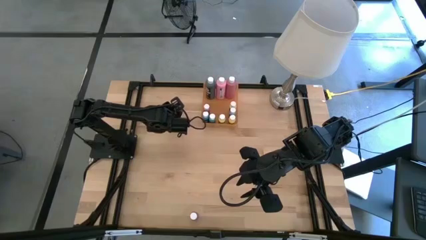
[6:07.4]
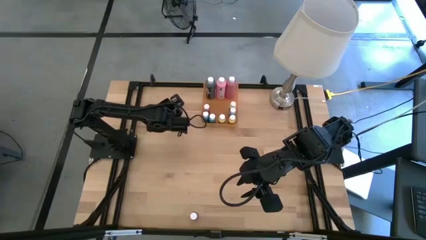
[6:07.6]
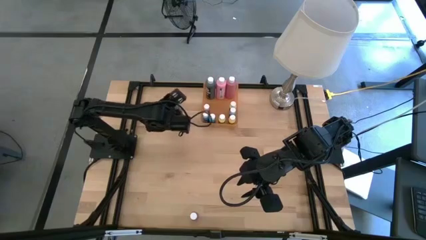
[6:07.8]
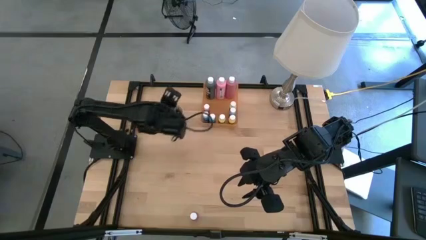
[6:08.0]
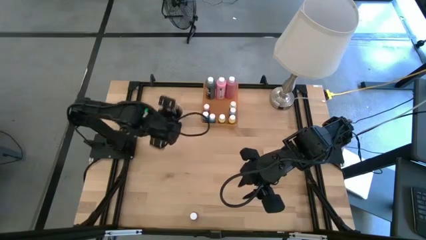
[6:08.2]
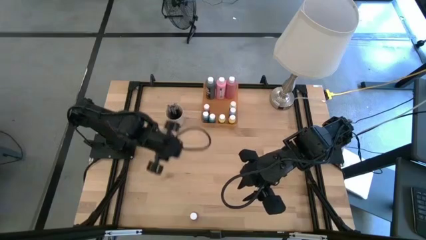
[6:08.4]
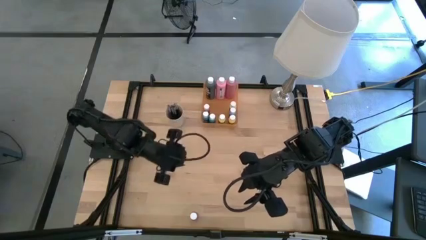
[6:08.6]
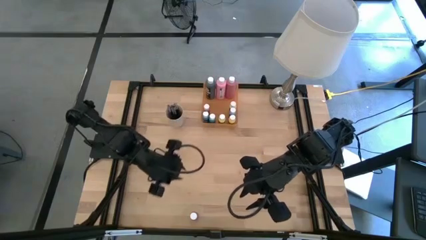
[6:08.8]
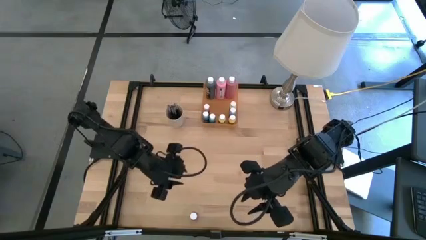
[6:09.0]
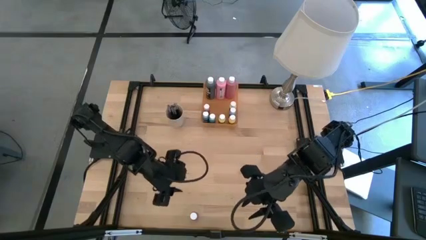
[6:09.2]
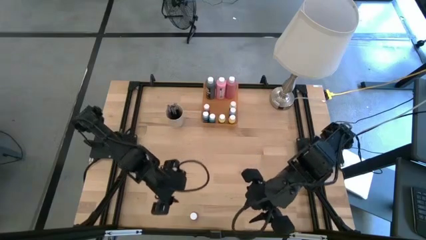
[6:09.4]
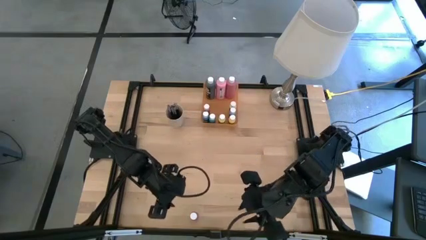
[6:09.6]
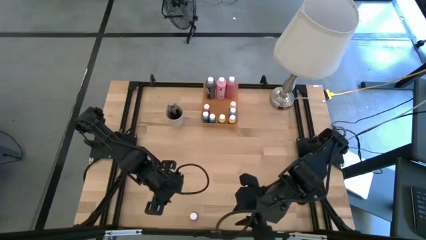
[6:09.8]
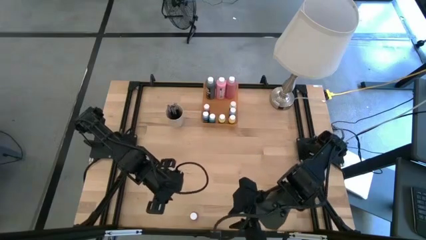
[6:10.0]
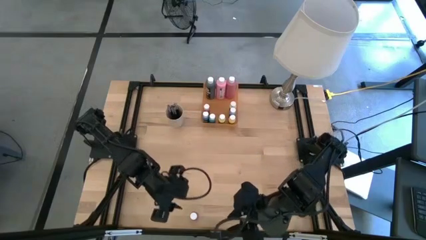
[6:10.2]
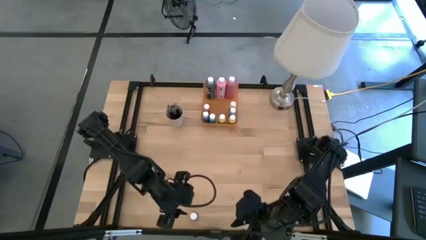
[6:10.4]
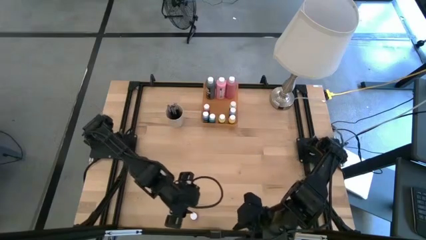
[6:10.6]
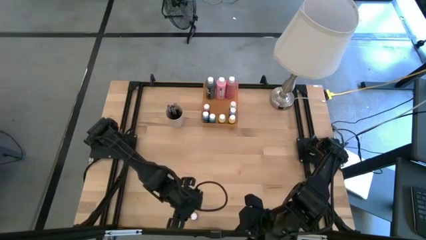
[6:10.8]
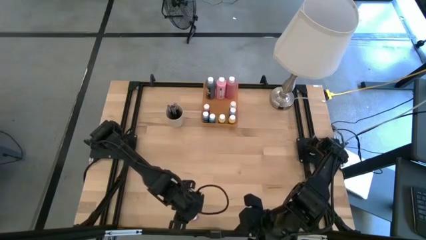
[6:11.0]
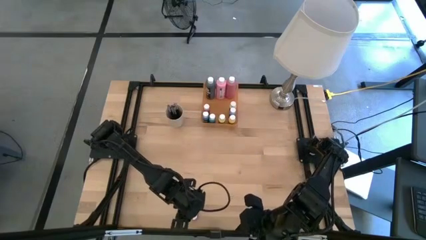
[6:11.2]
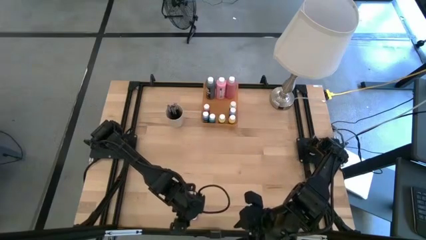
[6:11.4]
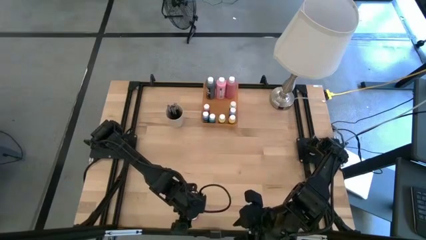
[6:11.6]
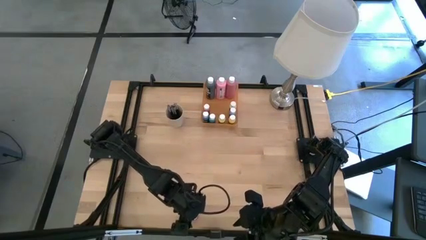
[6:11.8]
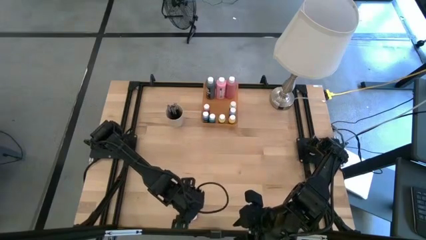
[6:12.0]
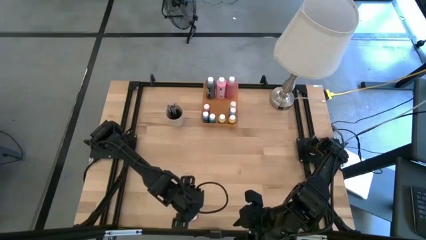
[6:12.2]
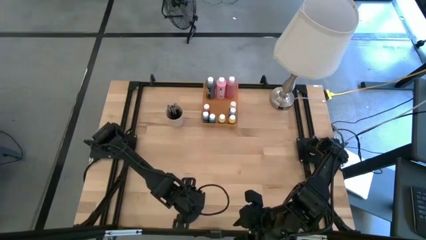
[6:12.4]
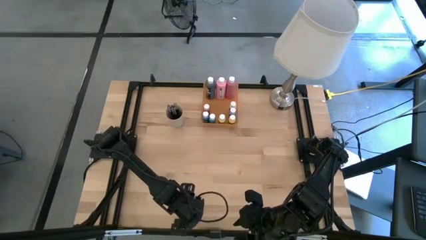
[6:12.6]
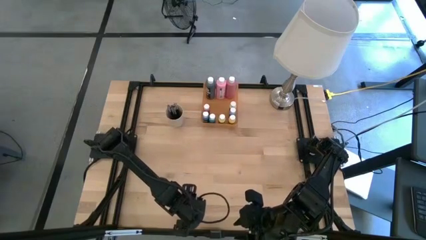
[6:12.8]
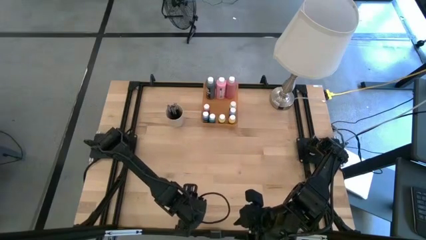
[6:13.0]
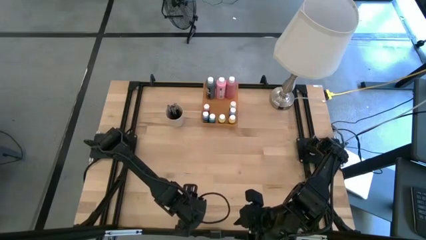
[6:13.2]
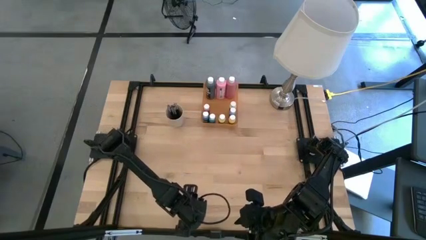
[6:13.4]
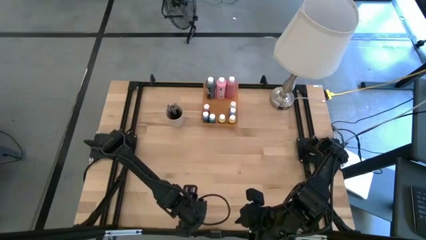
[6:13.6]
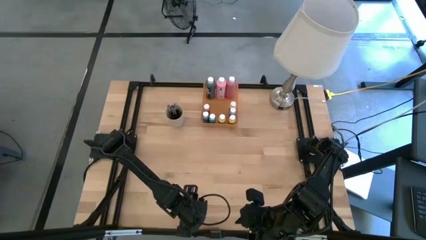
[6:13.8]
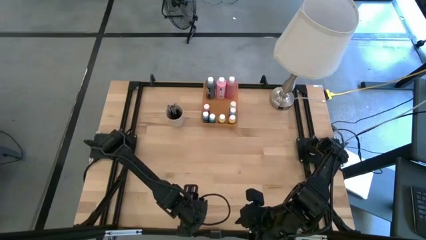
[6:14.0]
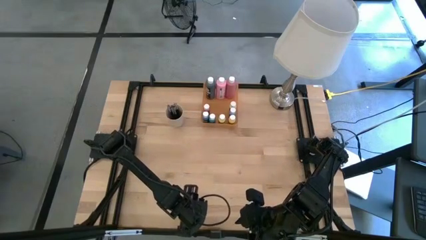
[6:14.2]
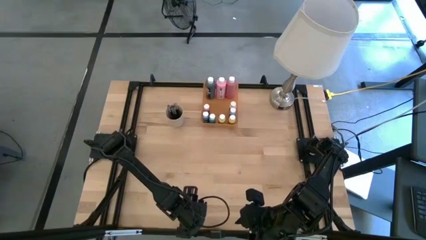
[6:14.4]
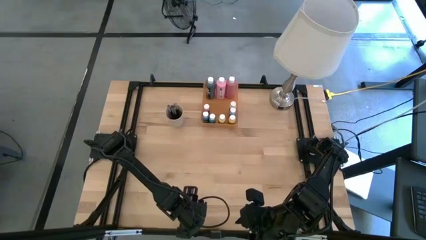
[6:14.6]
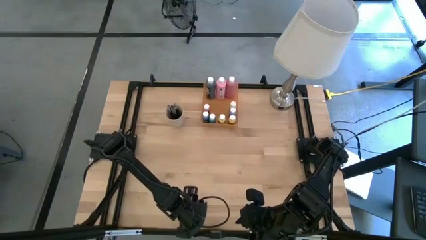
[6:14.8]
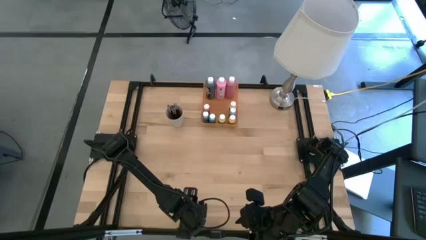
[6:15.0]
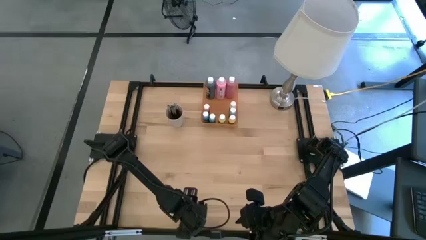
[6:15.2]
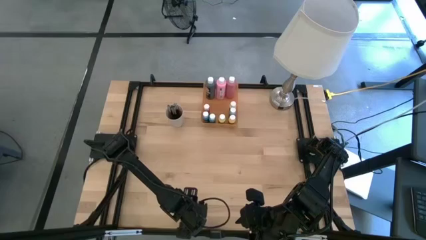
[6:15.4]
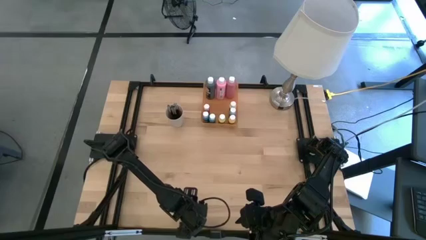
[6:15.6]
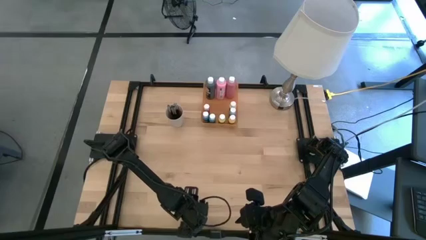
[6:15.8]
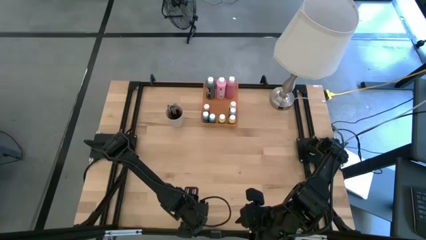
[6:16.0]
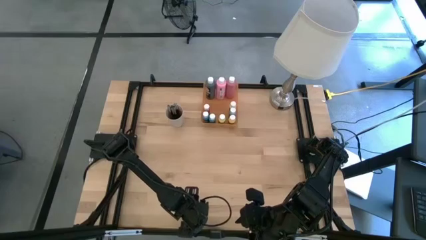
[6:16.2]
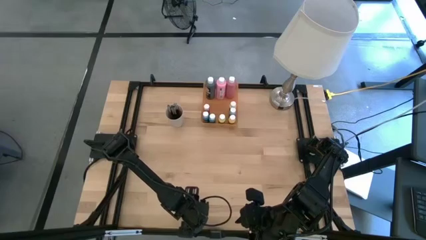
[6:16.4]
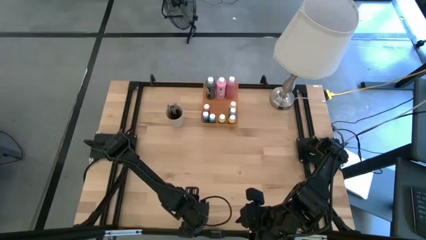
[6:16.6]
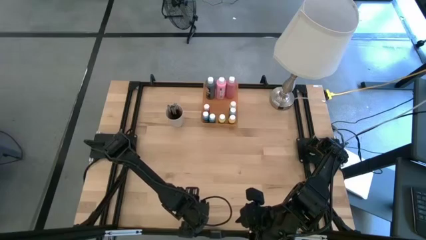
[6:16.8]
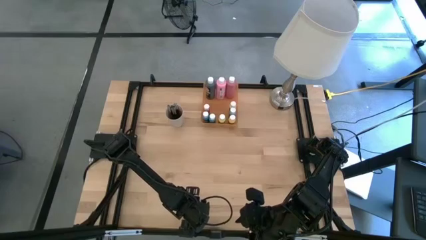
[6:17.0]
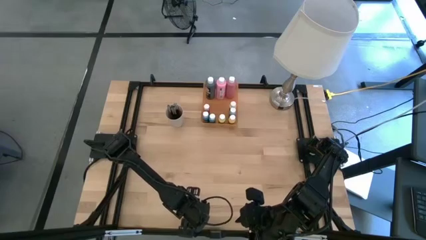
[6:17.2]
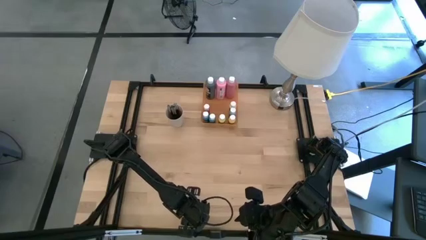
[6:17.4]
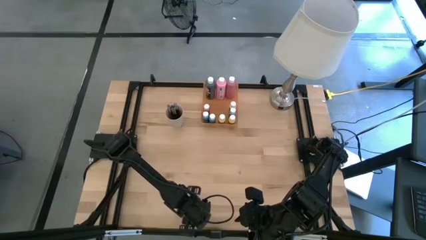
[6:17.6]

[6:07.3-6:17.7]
Task: Pick & Place Paint Supplies
Put the pink paint bottle into the orange bin

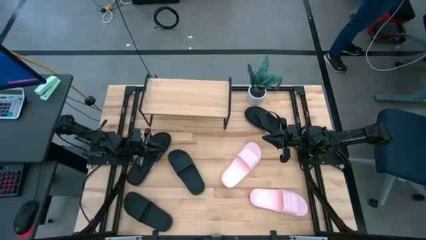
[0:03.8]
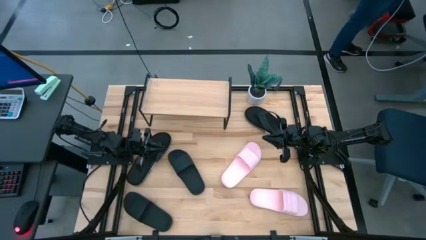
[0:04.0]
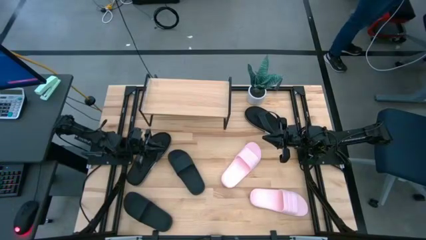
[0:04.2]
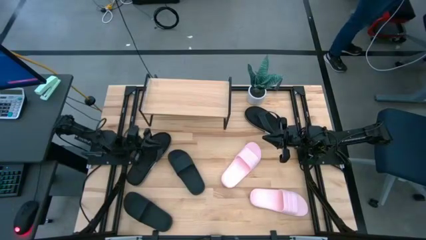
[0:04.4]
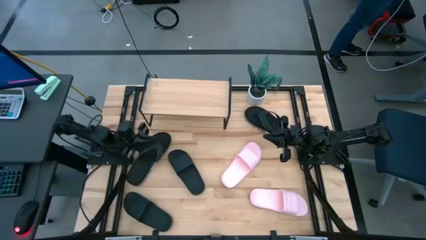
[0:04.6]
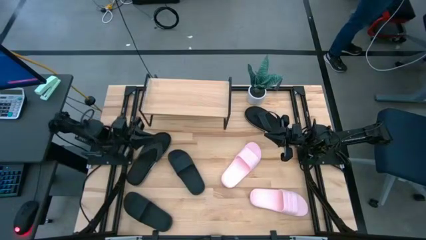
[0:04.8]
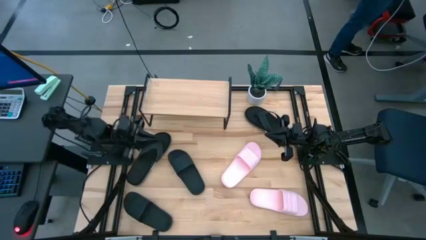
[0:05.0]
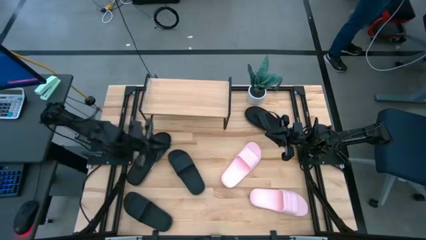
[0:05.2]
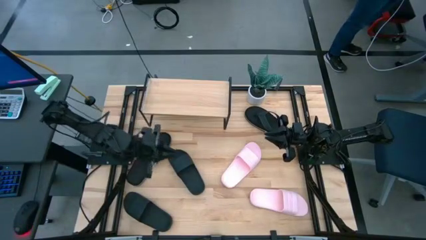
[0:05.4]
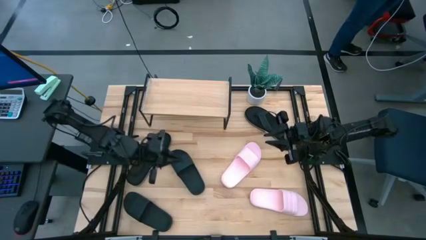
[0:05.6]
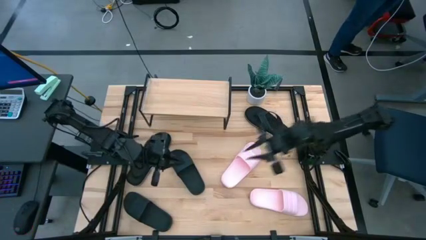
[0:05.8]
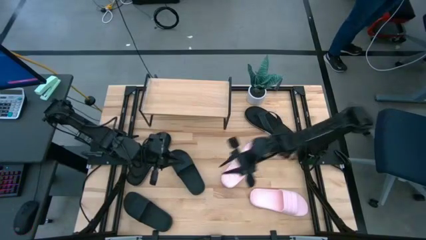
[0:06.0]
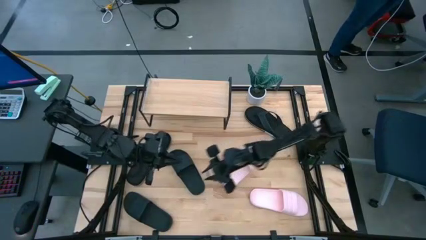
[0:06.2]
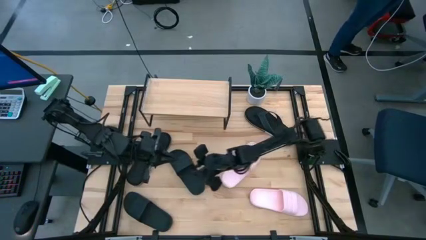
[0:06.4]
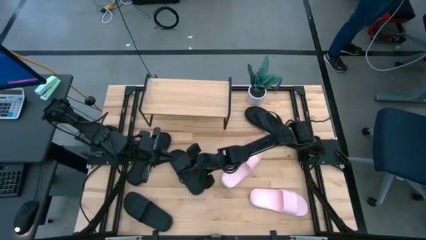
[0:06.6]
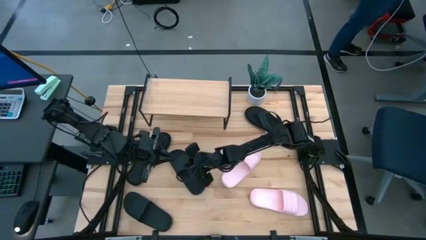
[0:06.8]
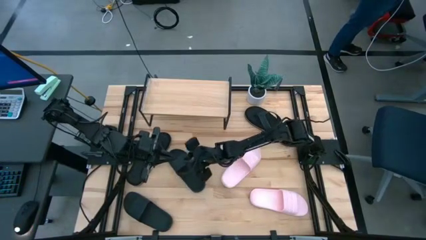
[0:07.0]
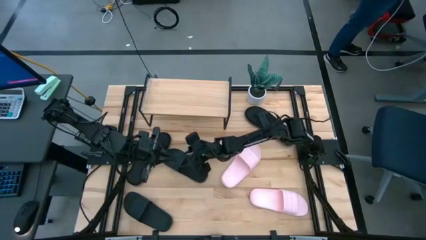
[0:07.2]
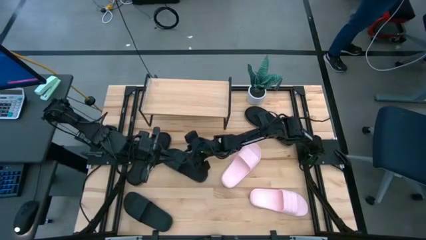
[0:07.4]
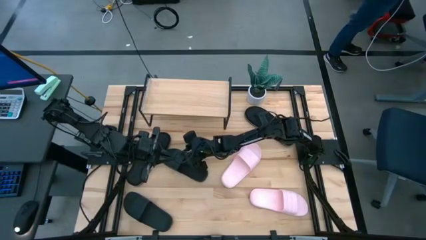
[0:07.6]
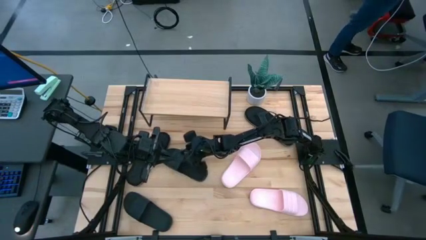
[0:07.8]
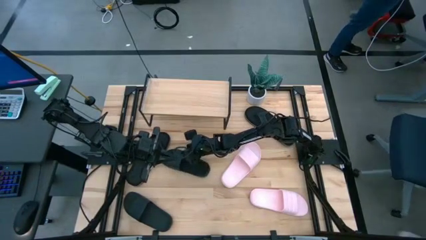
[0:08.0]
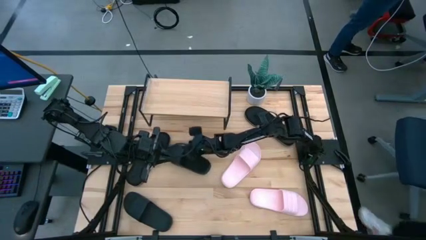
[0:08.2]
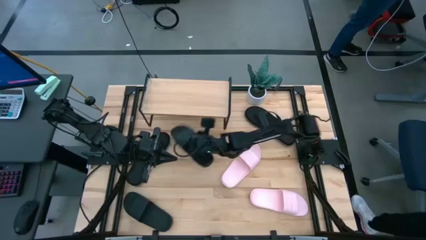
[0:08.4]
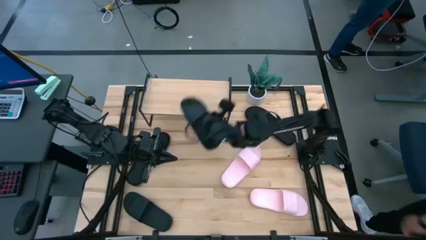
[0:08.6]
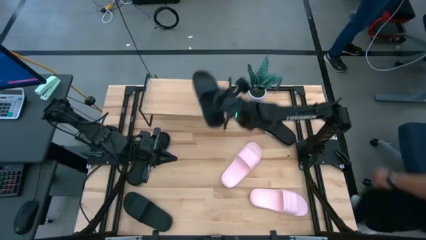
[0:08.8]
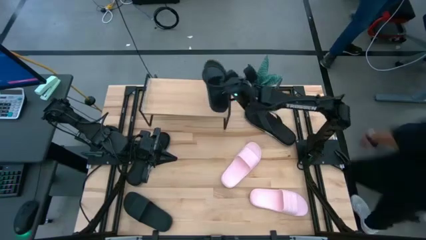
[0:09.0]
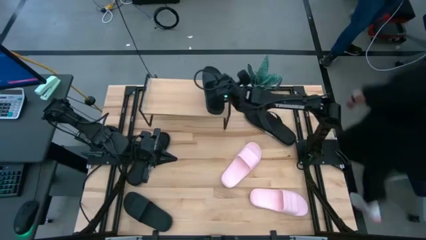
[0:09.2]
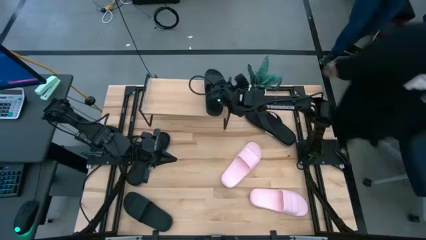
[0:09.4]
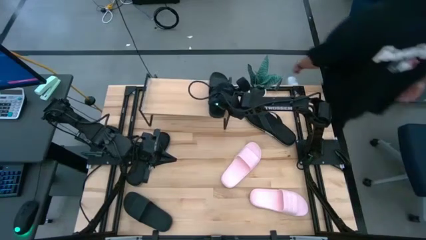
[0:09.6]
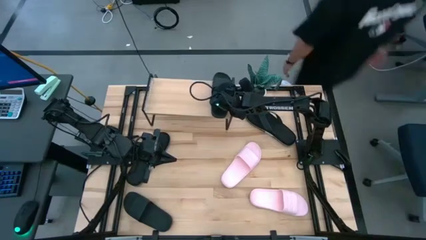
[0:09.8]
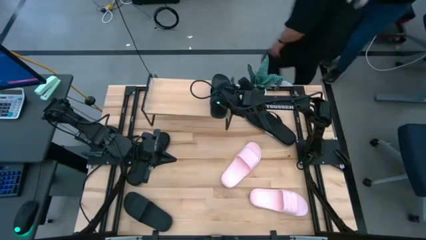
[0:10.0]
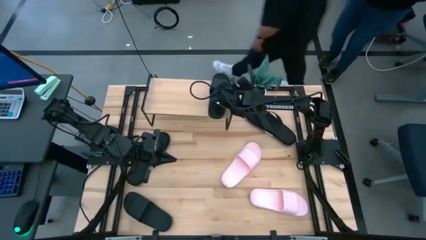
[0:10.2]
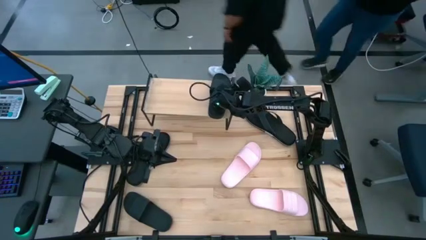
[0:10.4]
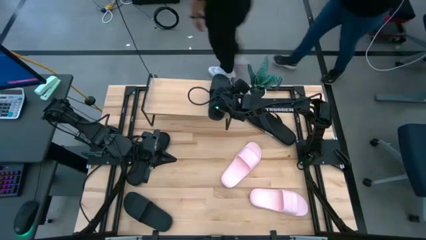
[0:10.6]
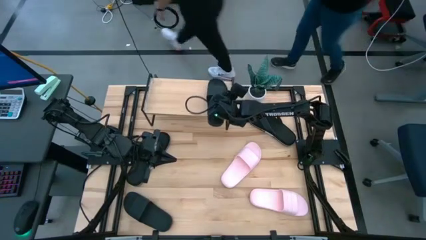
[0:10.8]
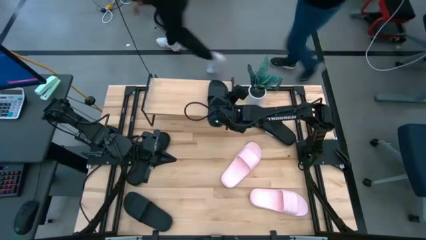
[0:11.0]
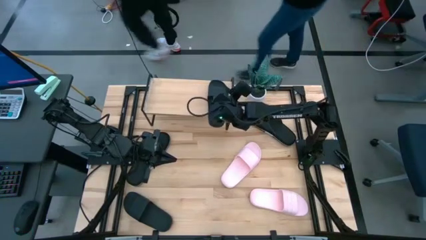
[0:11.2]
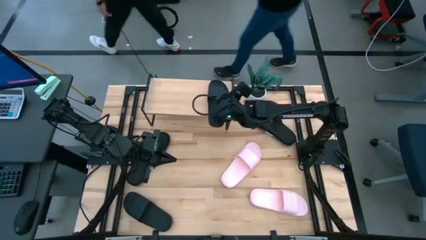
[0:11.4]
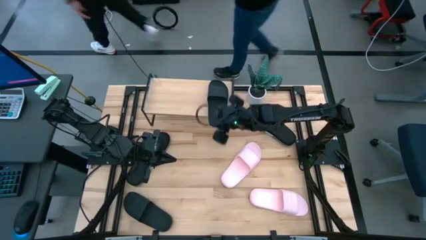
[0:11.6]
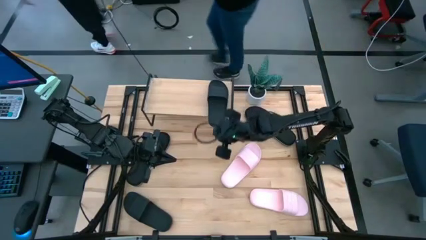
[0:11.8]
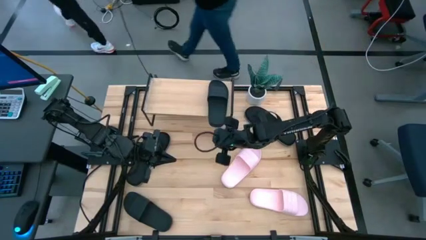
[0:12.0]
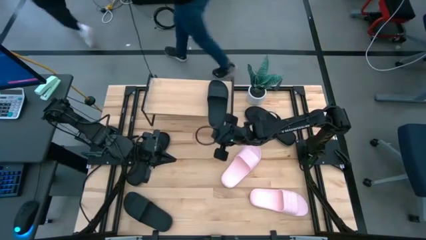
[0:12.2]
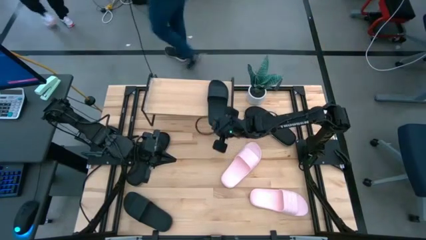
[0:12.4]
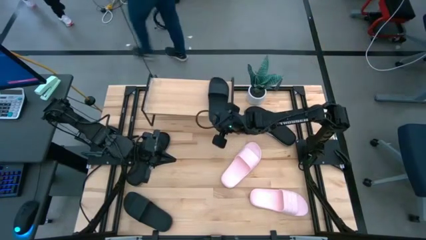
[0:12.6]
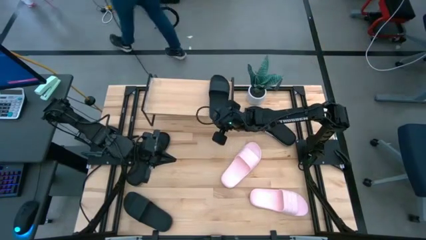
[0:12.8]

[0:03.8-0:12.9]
Task: Pick and place slides into the shelf
Put the top black slide on the shelf
